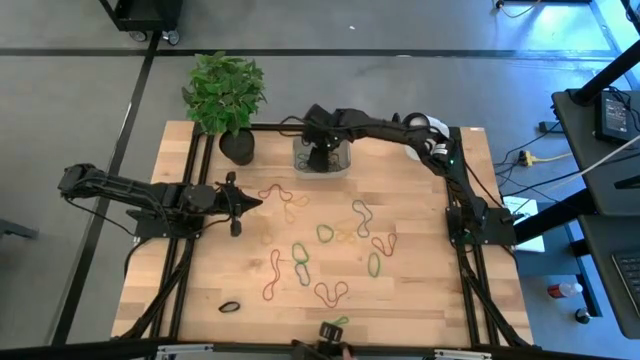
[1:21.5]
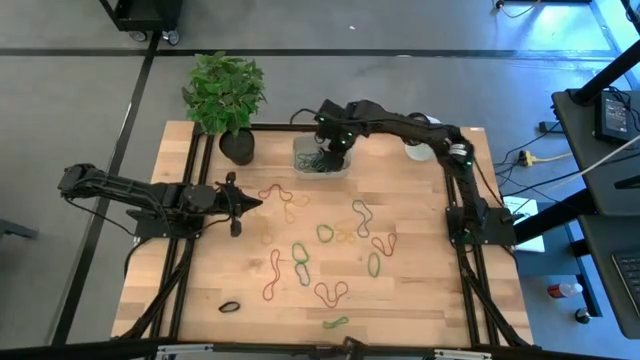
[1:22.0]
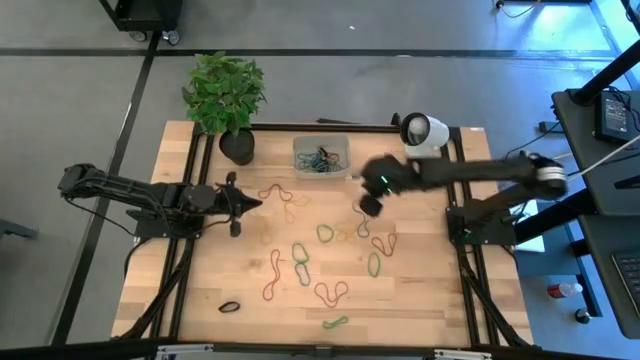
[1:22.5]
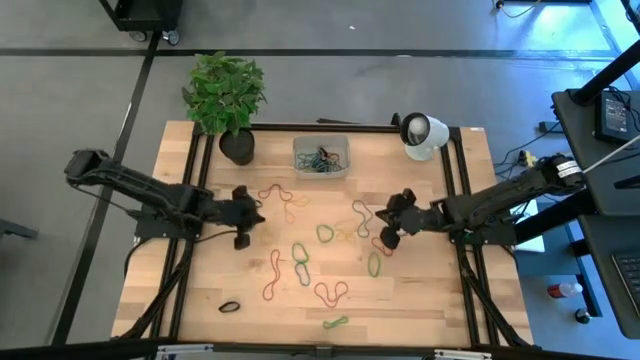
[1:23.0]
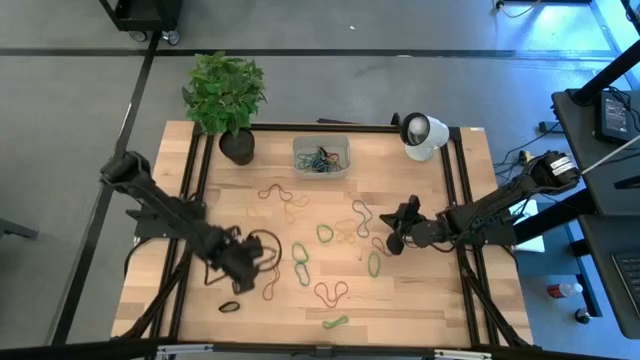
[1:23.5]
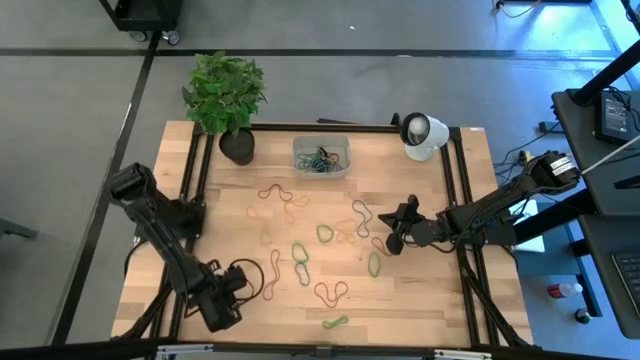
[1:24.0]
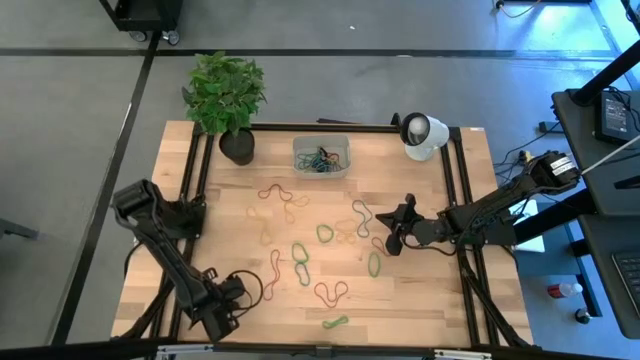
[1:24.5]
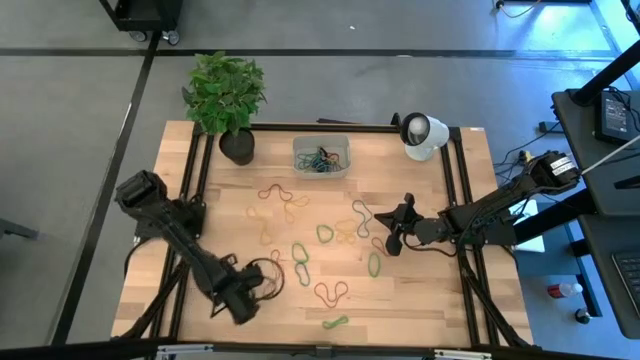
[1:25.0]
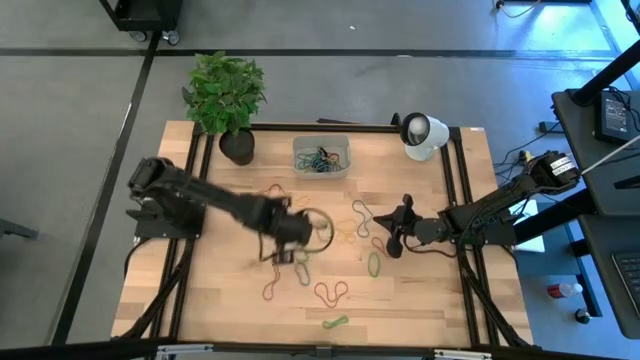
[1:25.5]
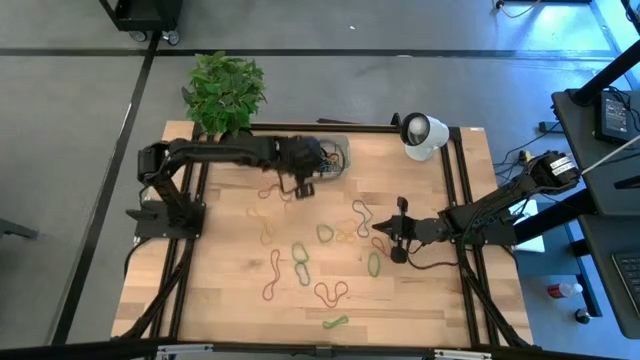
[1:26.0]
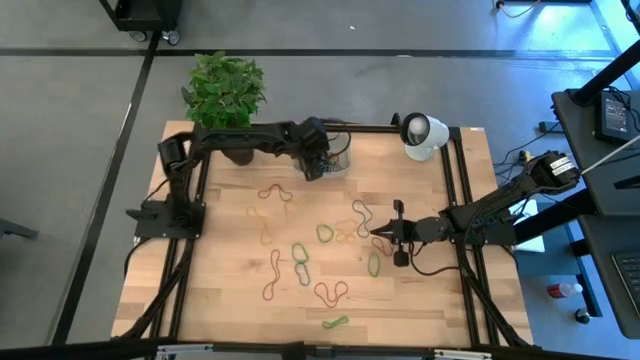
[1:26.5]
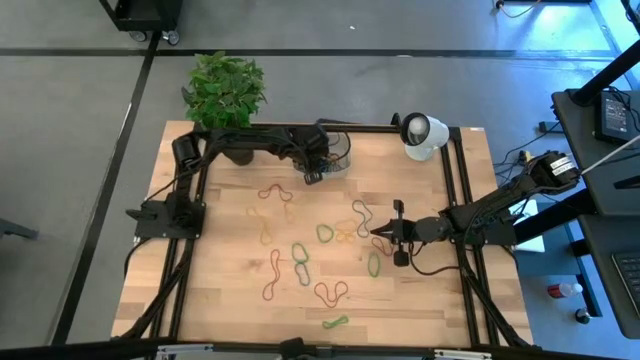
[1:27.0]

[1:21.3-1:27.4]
Task: Pick and place rubber bands into bin
Put the black rubber band into the gray bin

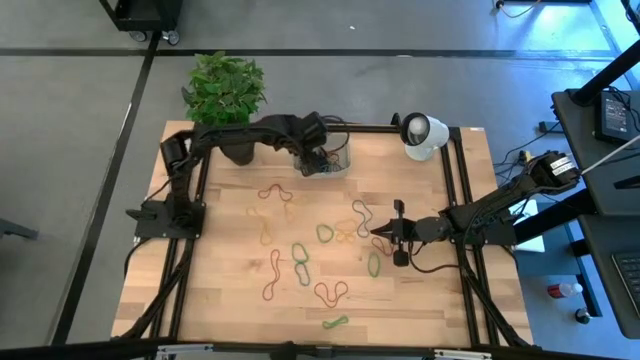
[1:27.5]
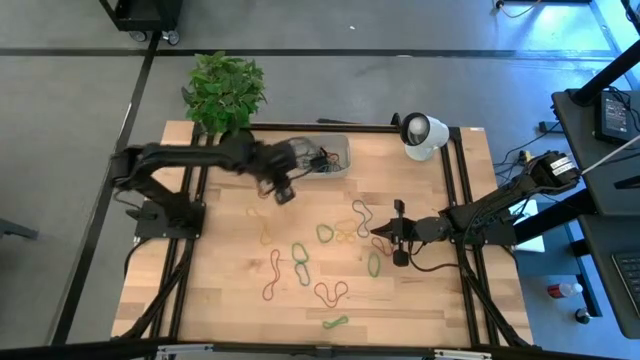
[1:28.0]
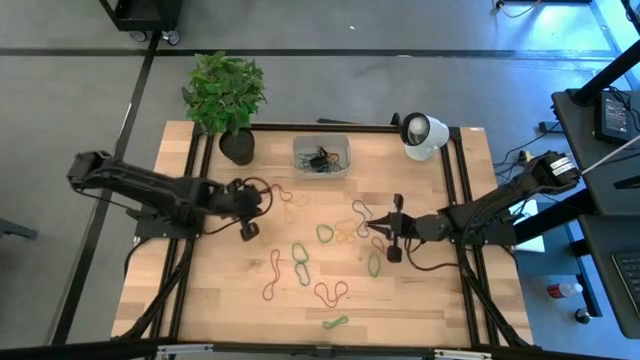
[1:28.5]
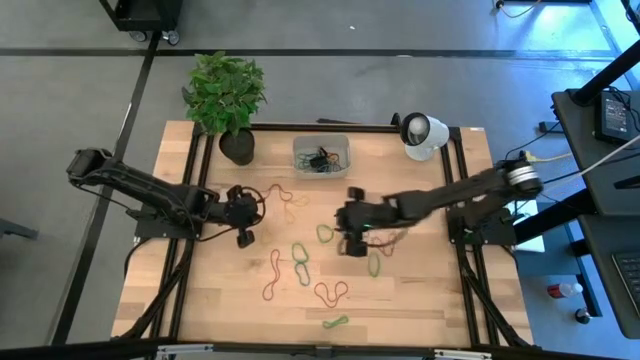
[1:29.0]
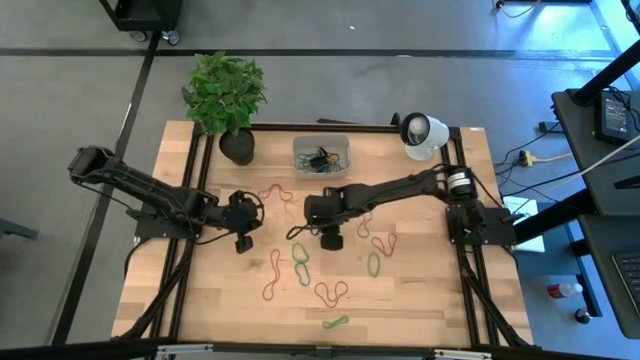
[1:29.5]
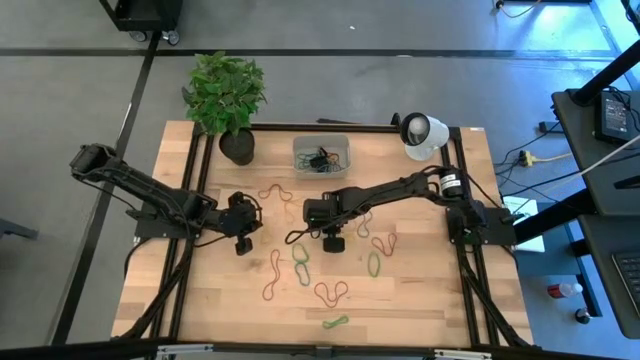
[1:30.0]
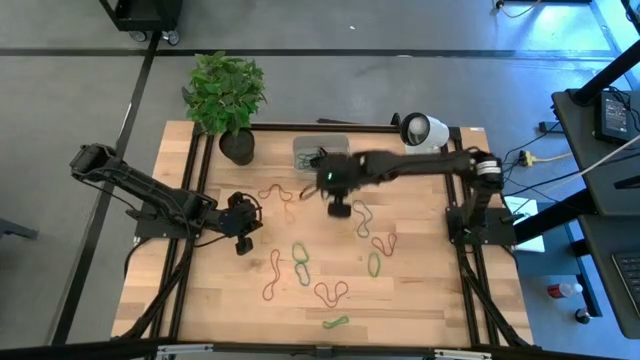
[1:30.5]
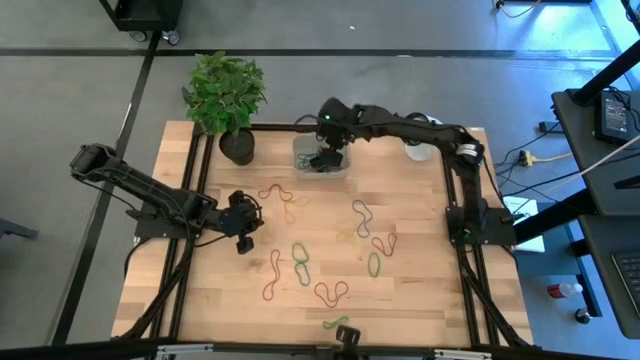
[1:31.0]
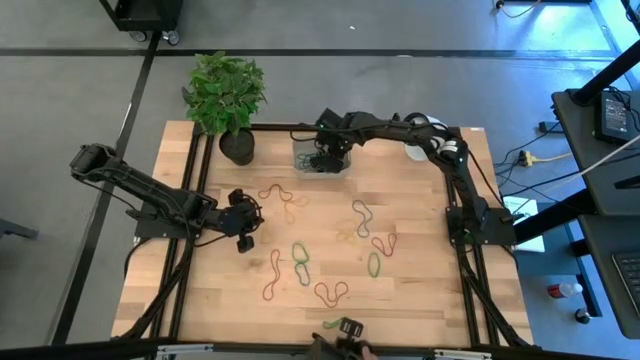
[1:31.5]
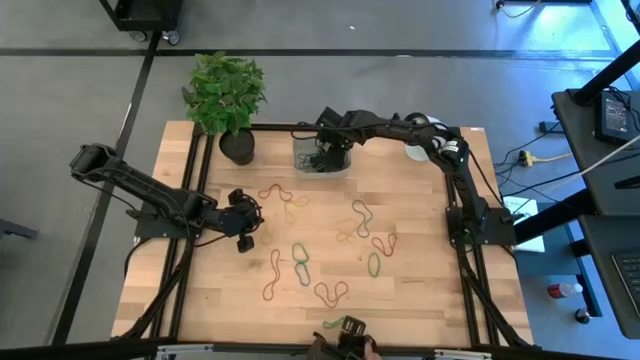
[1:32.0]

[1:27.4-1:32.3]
Put the green rubber band into the gray bin

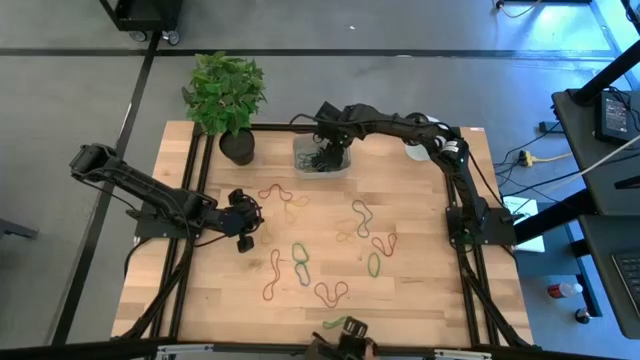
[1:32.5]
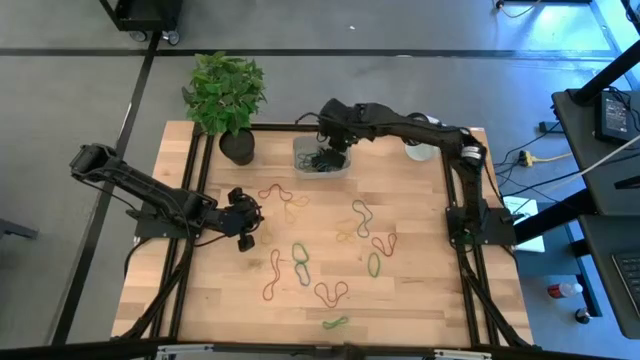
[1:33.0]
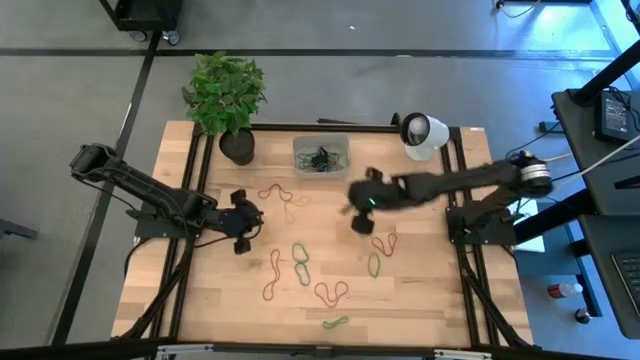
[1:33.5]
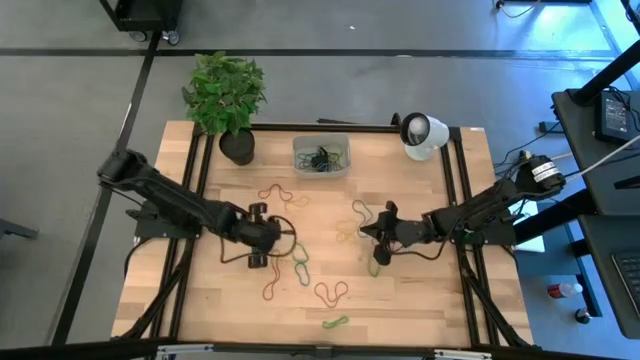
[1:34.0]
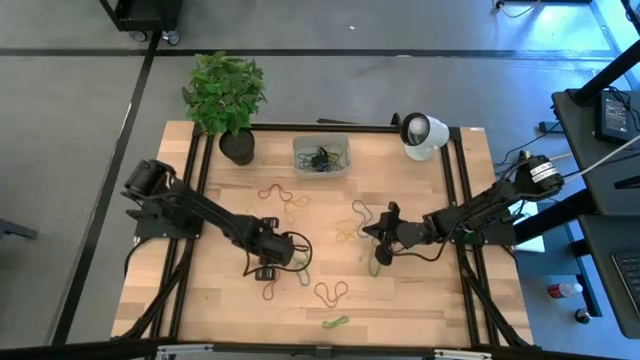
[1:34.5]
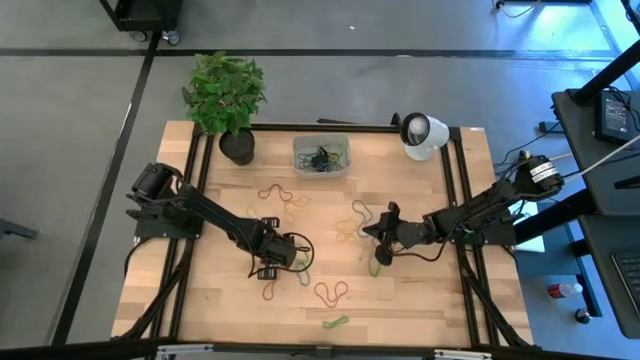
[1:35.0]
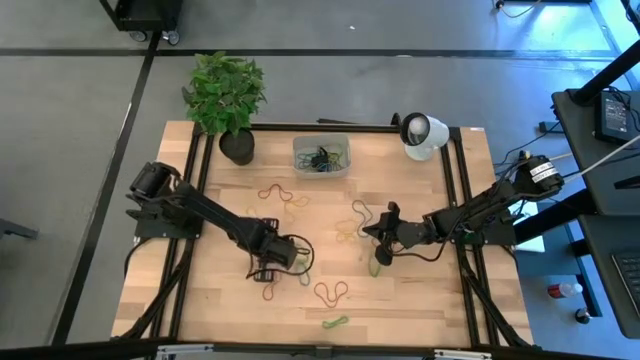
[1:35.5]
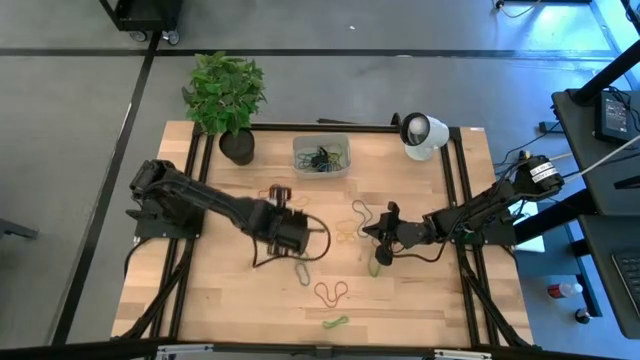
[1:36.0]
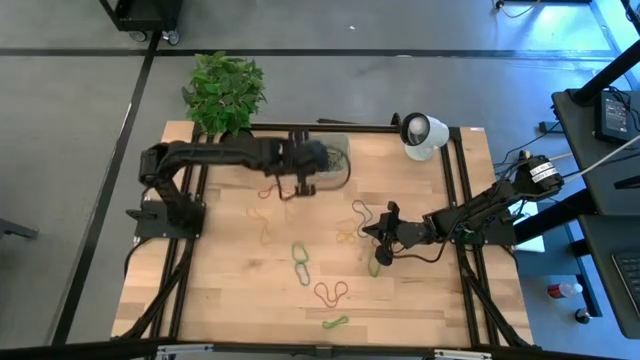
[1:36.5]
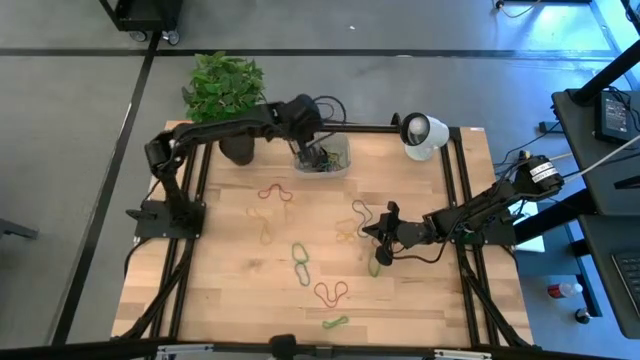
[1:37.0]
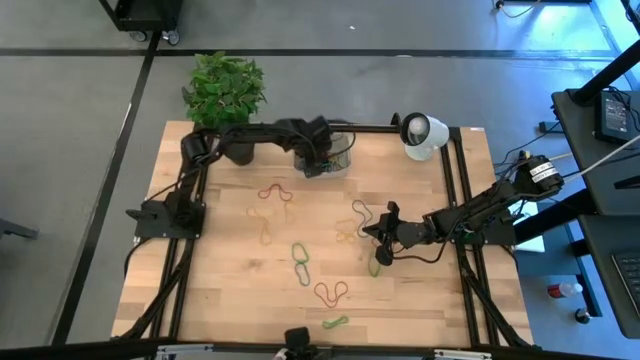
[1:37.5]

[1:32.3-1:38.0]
Put the red rubber band into the gray bin

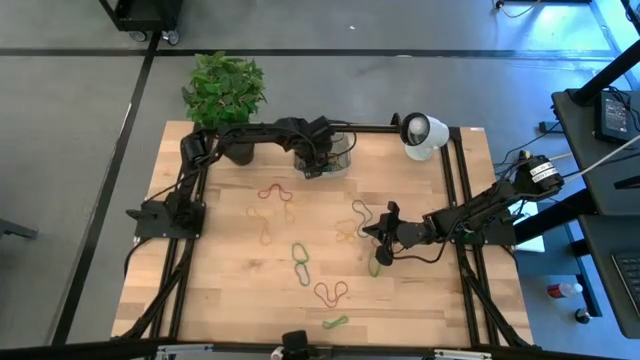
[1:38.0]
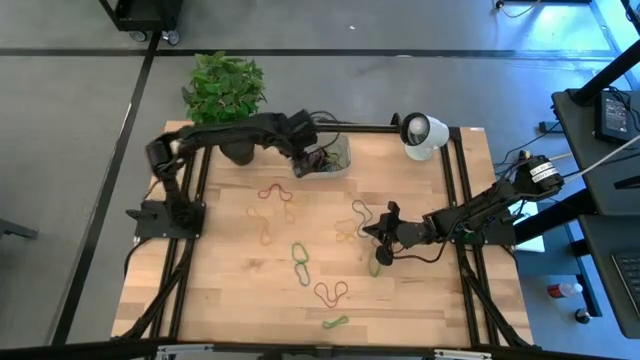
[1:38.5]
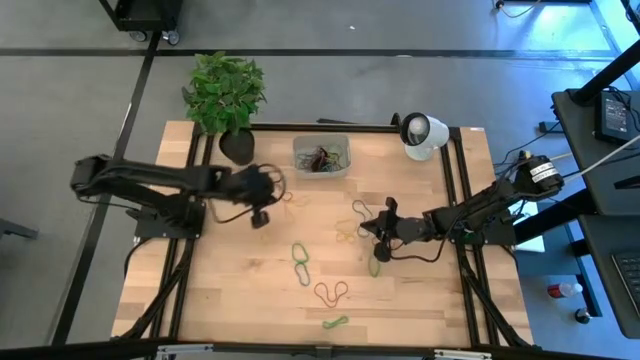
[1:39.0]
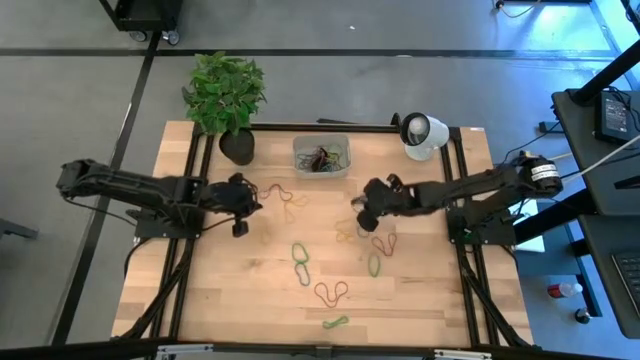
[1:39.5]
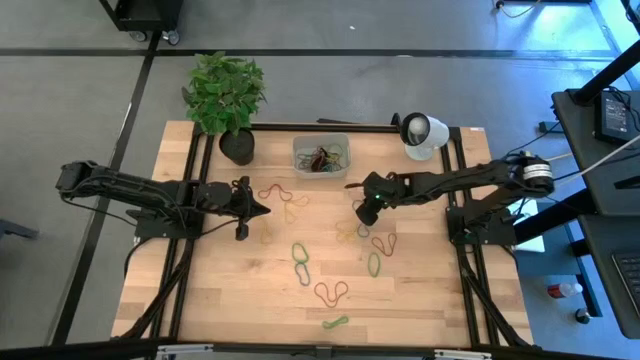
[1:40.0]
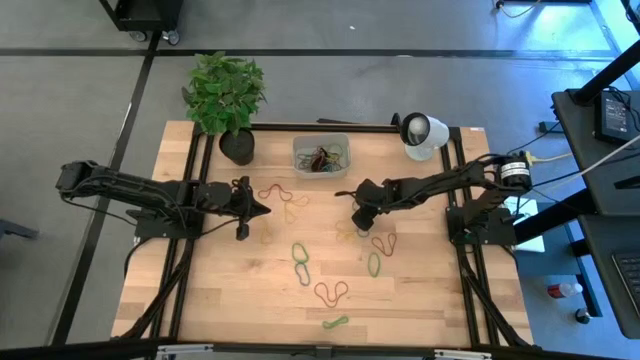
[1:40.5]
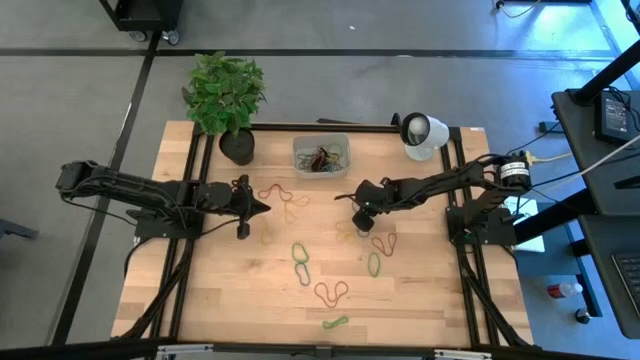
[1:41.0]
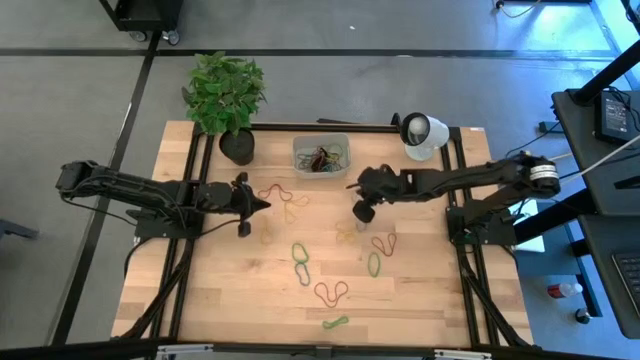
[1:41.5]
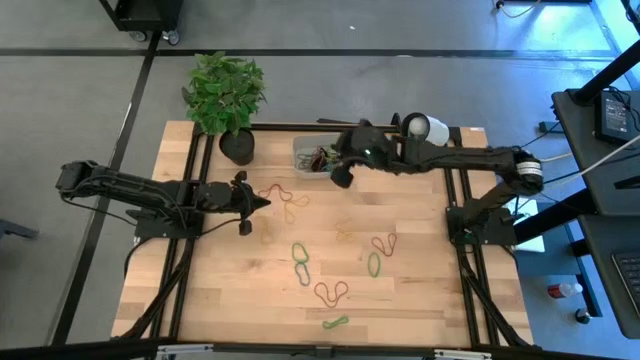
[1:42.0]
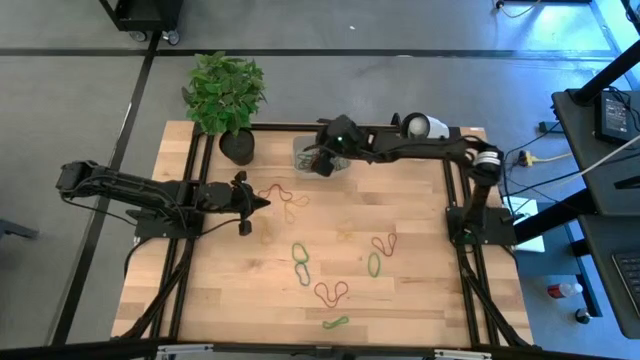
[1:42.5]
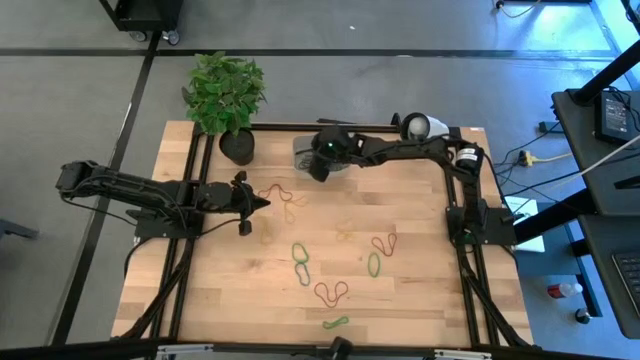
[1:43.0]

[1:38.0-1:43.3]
Put the blue rubber band into the gray bin
